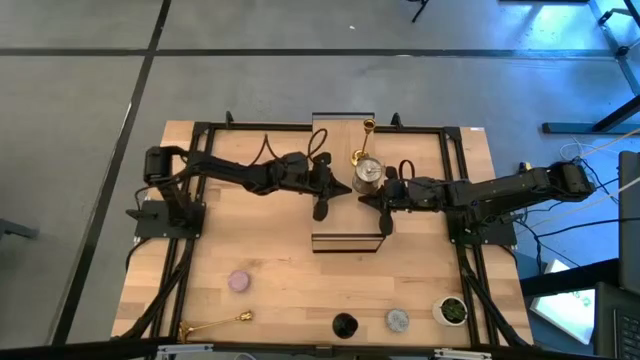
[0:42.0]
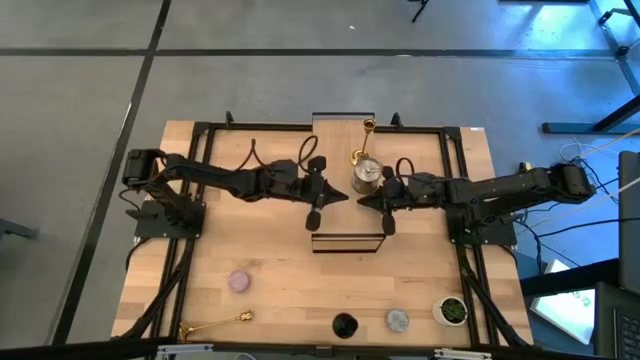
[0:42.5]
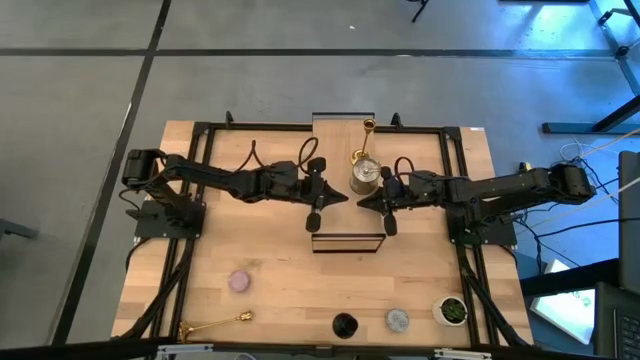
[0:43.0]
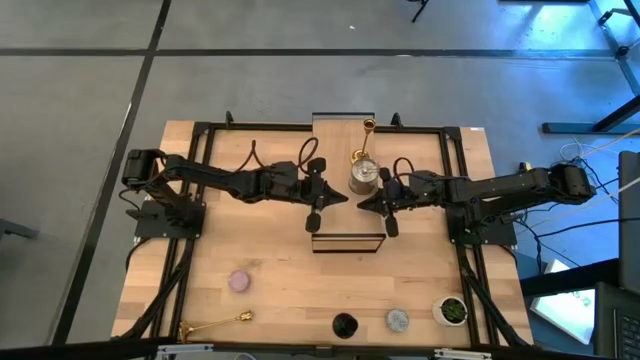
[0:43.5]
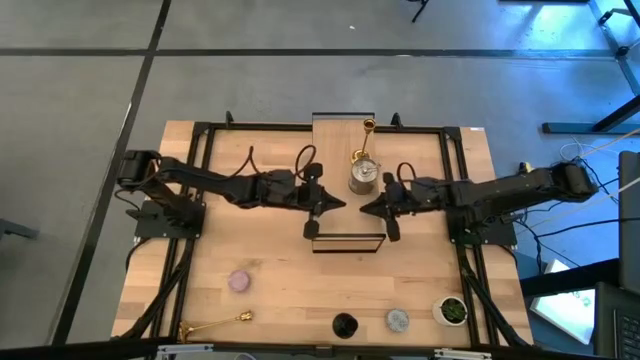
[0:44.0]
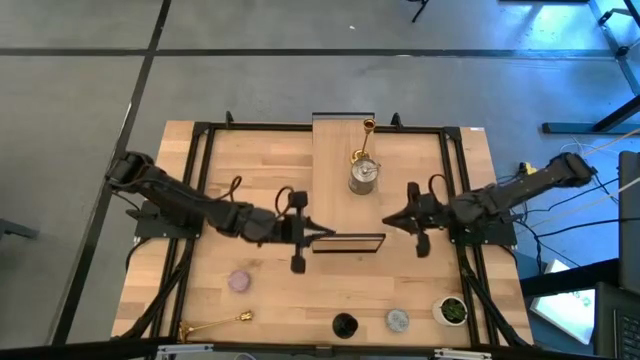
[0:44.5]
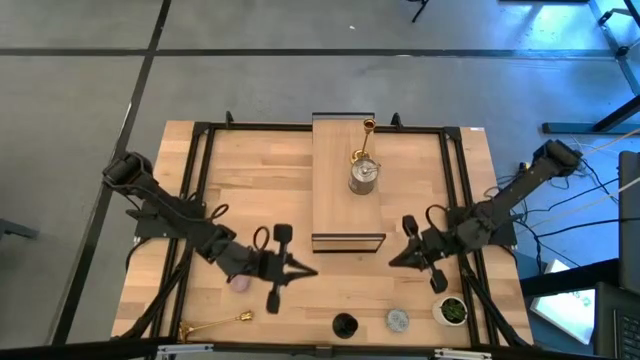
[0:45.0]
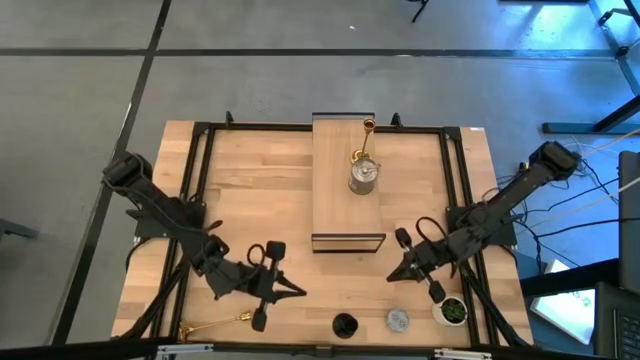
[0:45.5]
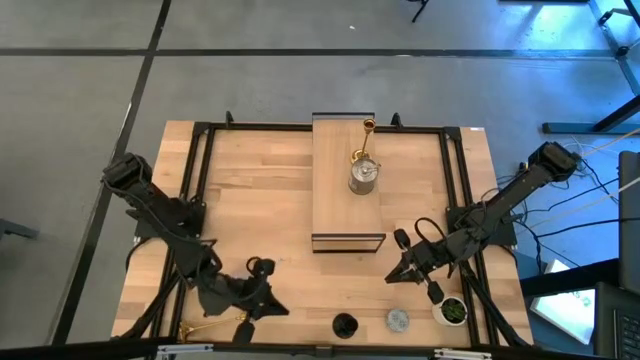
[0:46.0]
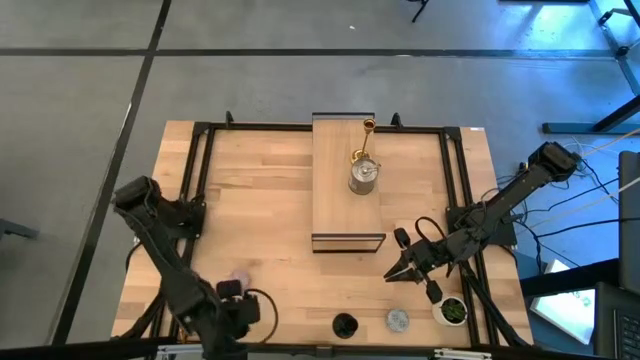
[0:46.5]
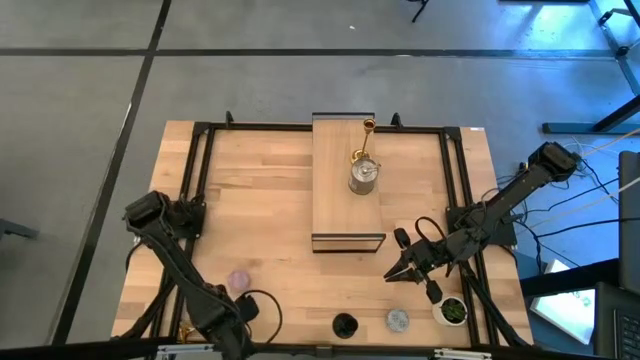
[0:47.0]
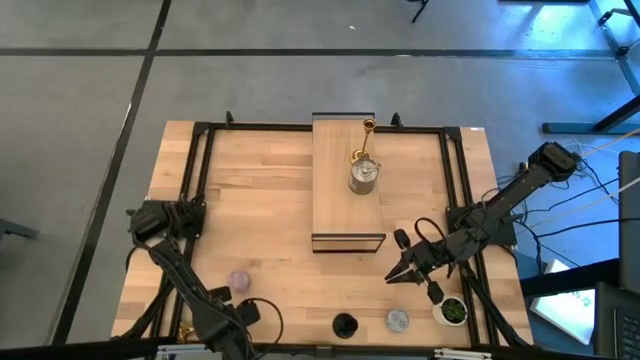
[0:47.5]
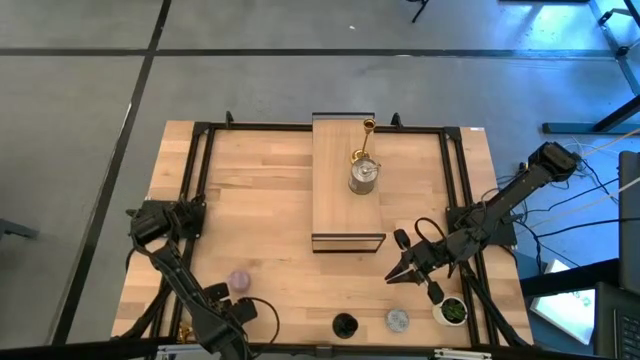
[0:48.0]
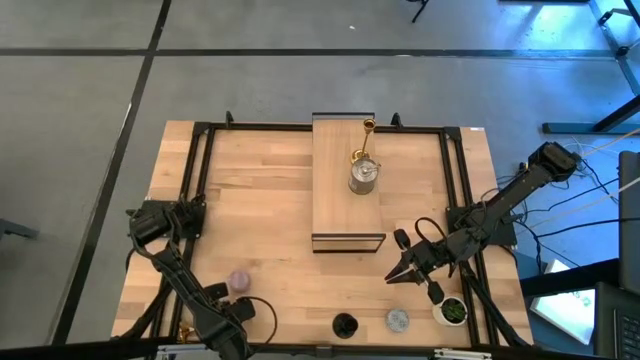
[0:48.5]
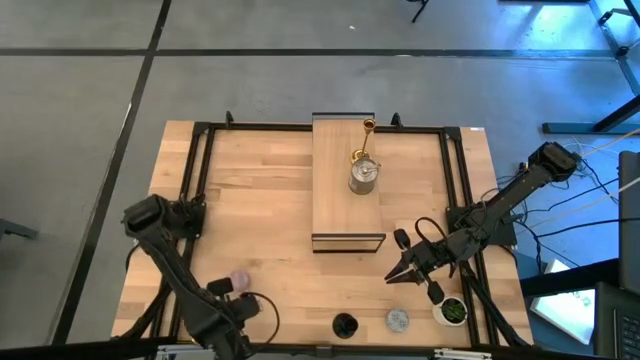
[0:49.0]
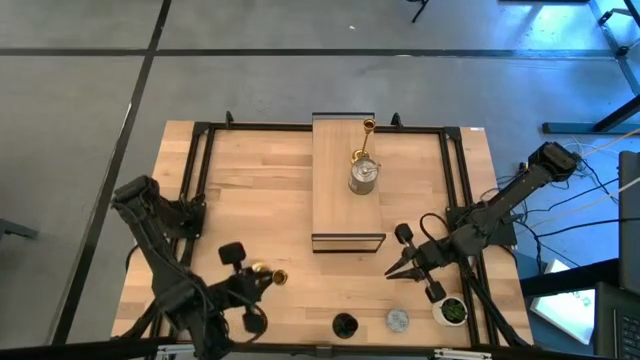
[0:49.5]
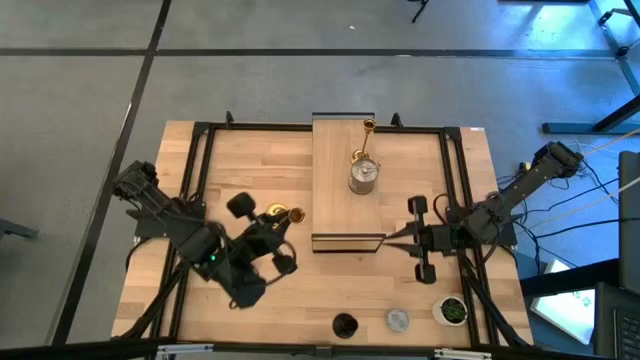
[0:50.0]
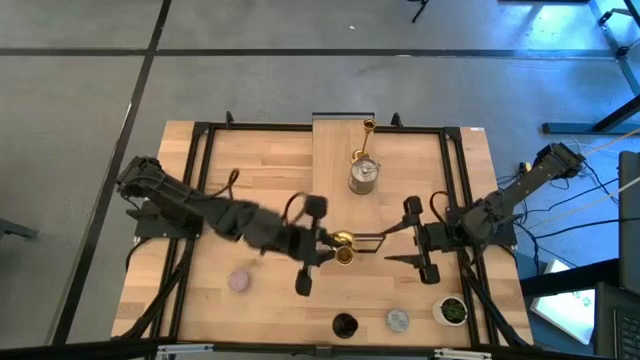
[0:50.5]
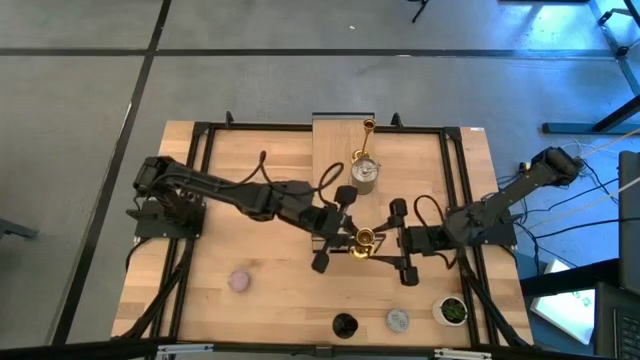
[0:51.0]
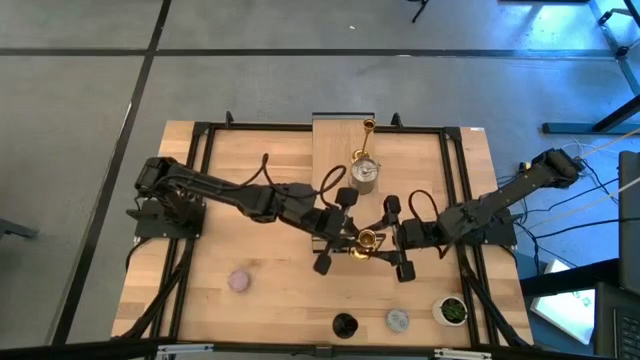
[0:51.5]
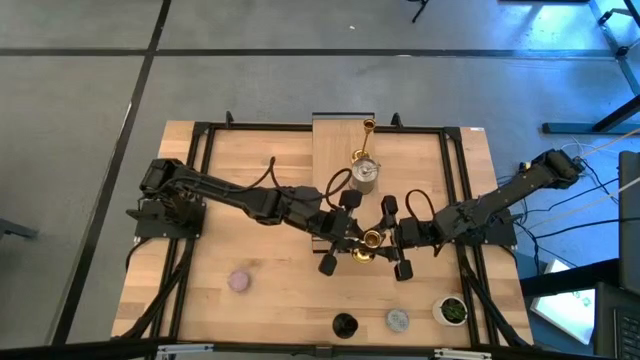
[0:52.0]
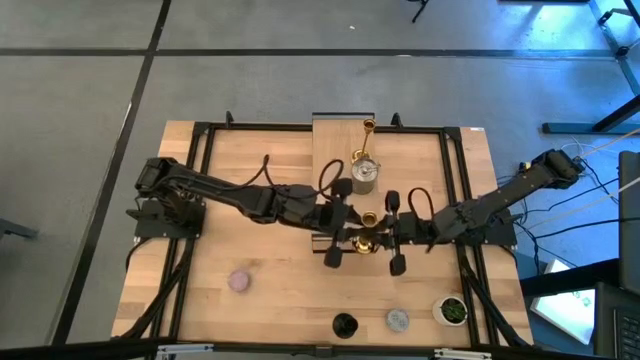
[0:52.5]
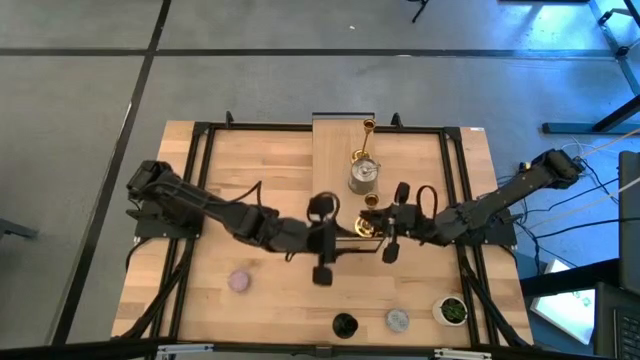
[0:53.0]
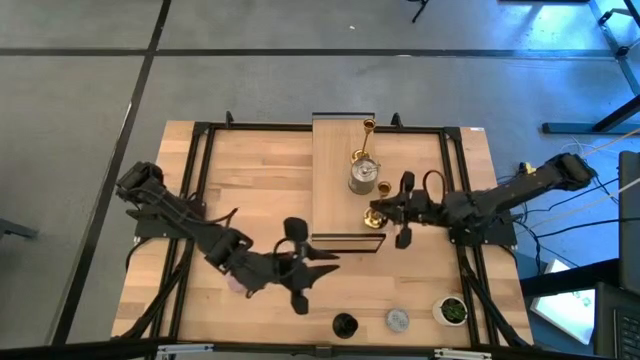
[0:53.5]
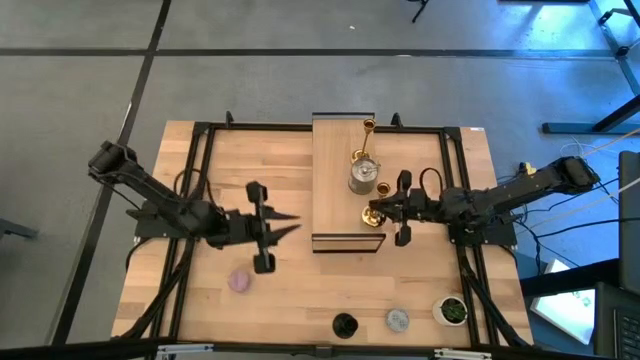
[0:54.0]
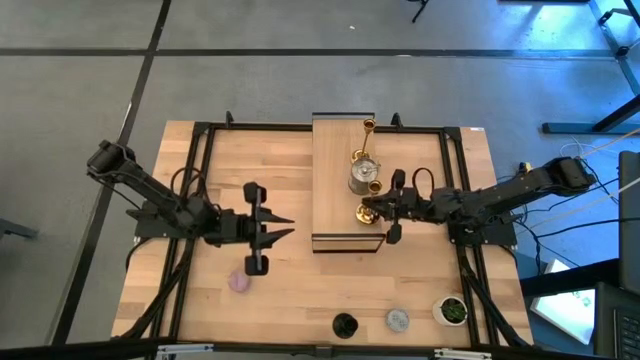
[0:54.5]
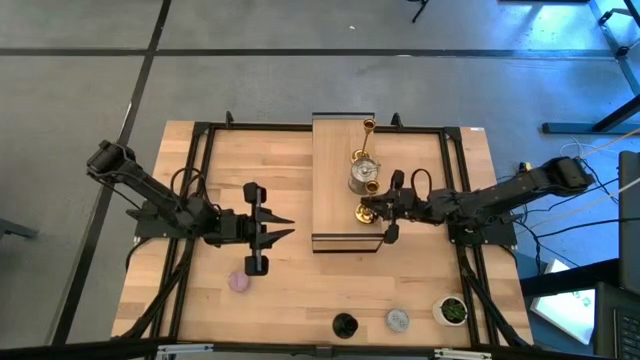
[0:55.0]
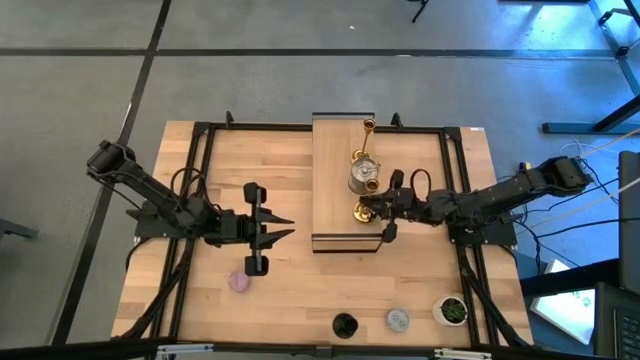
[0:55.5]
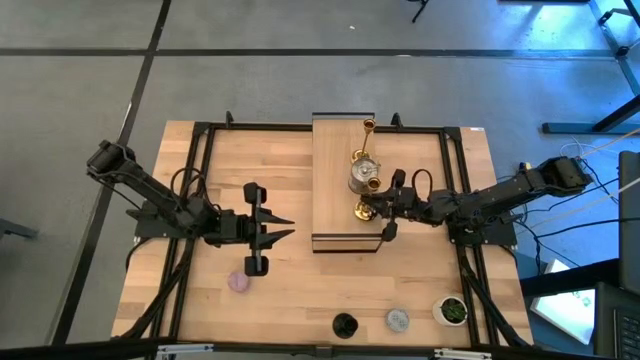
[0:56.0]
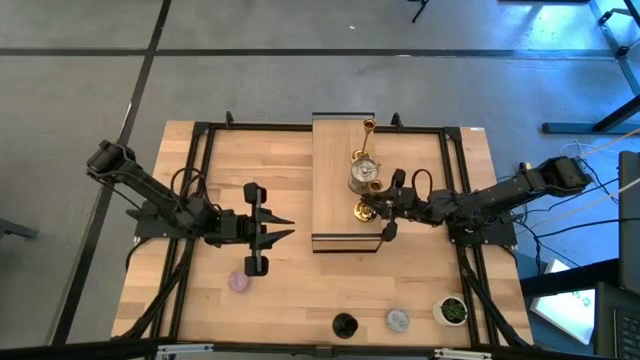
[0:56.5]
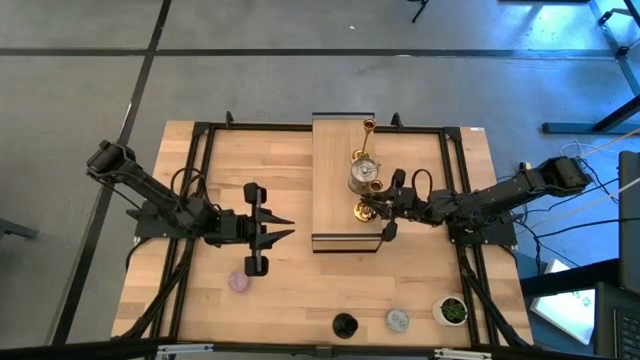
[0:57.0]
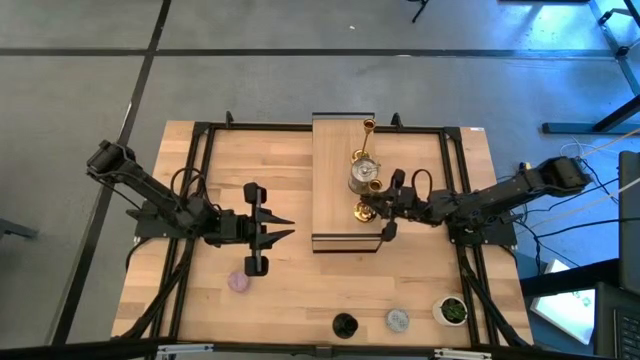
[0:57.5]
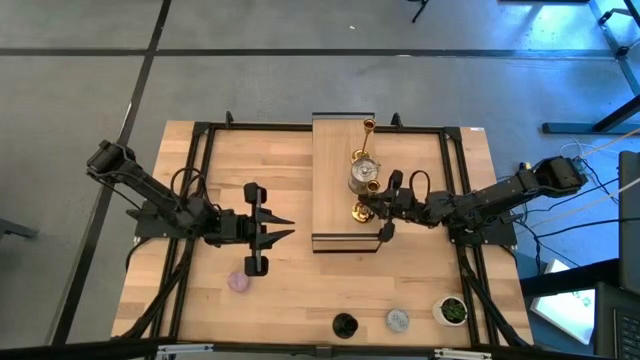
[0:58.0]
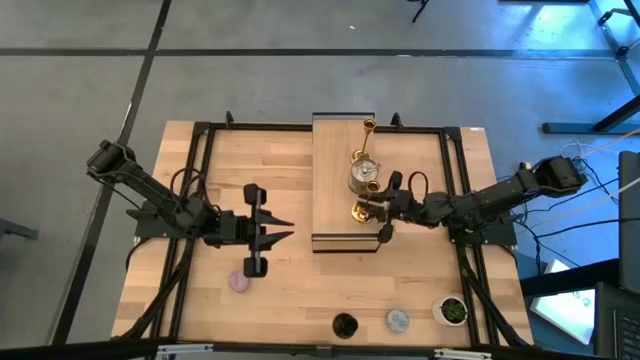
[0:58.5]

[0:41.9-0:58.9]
Task: Pick & Place candle stick holders
Put the golden candle holder on the shelf

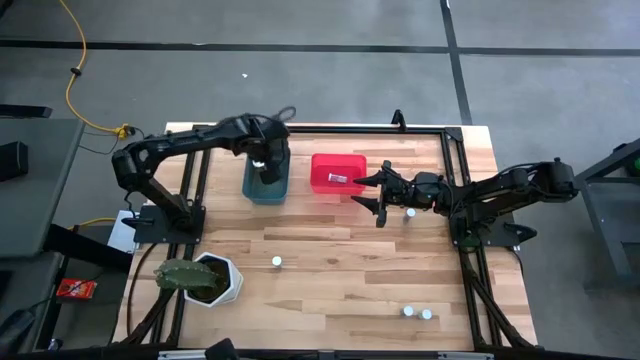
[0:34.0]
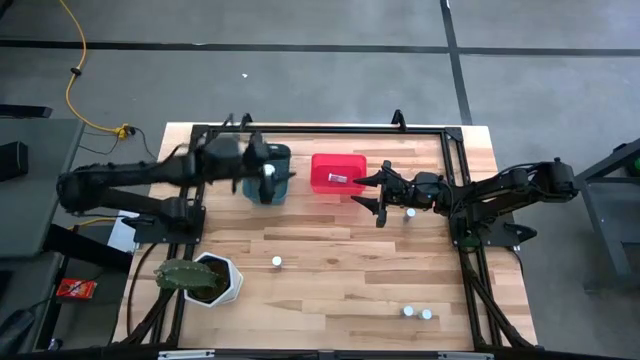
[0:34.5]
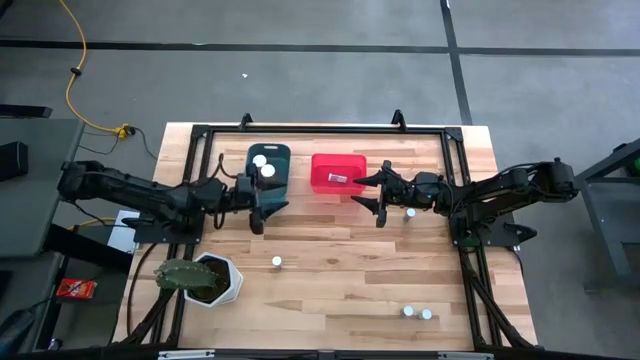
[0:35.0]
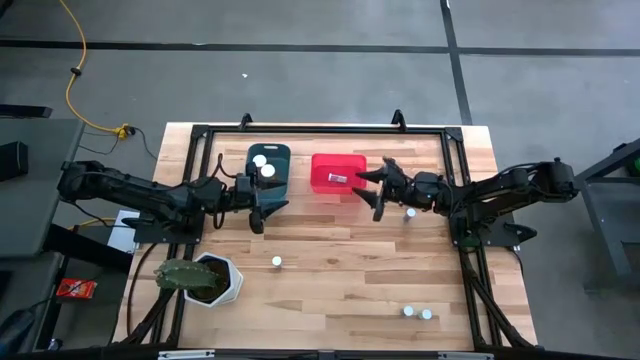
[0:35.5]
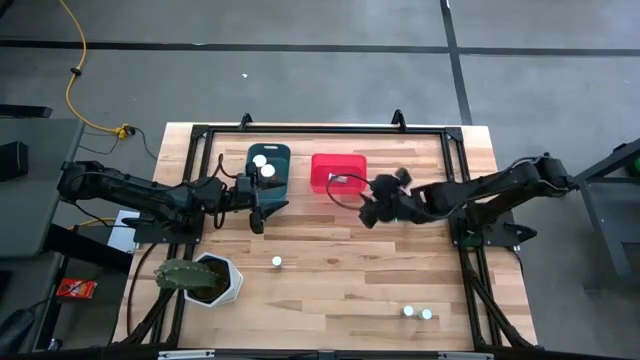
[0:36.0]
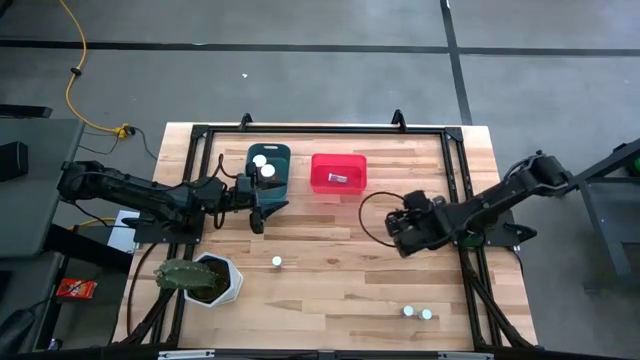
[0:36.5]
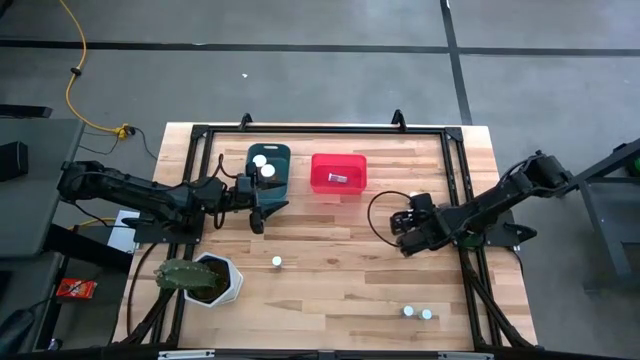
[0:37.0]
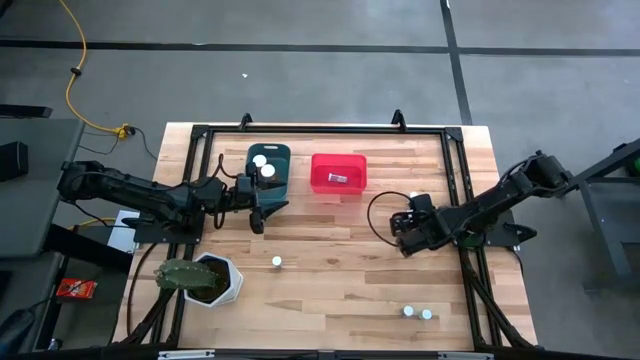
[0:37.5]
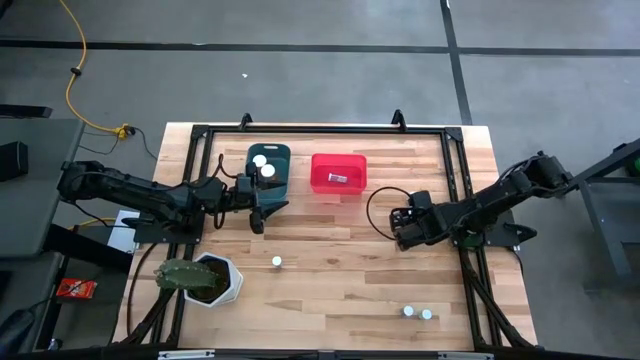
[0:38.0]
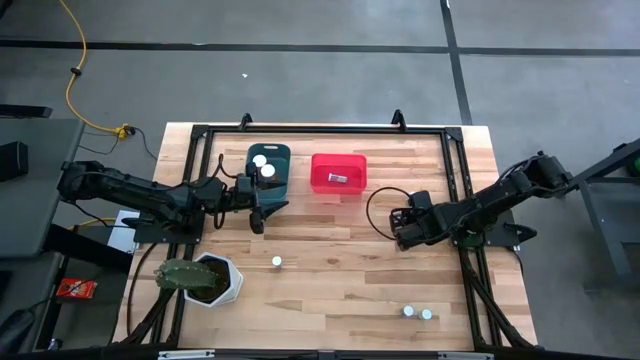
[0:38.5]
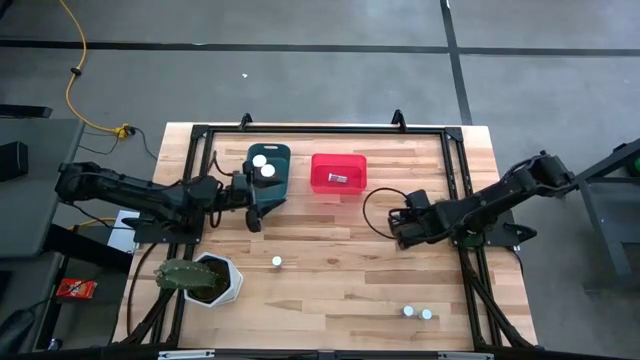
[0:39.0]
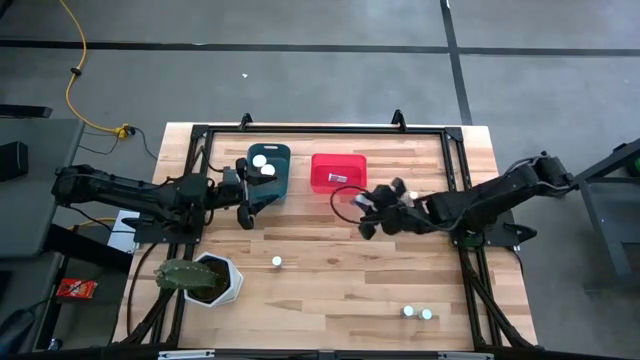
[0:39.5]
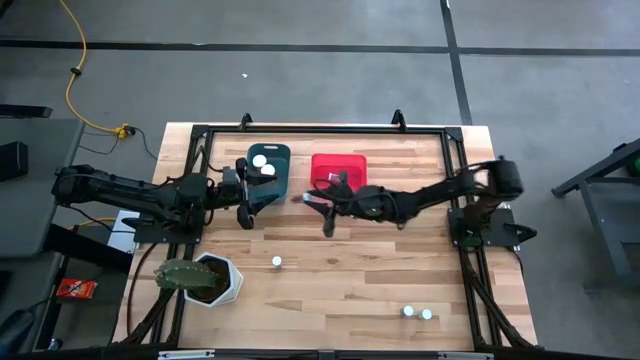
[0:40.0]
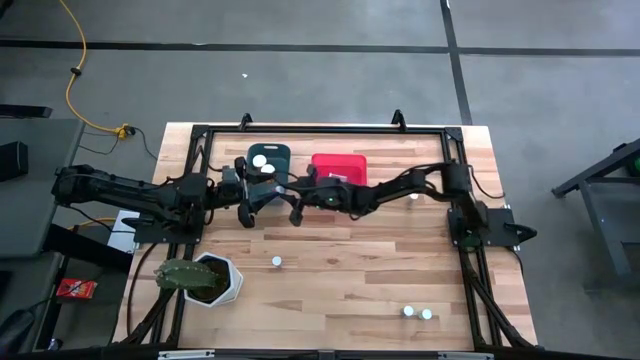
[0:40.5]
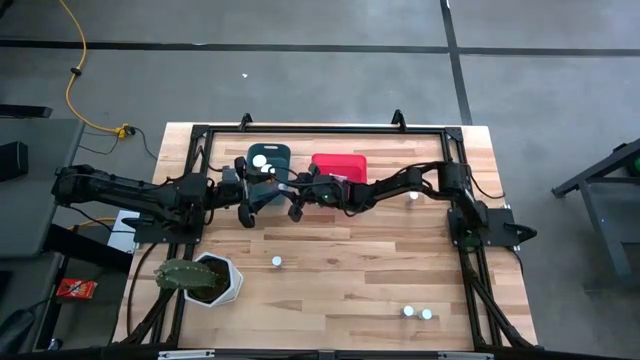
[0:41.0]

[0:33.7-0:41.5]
Task: Pick and place medicine bottles into bin by pill shape (circle, oval)
Put the middle right blue capsule bottle into the blue bin
